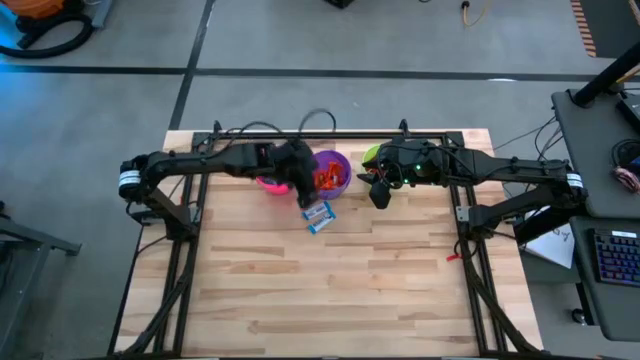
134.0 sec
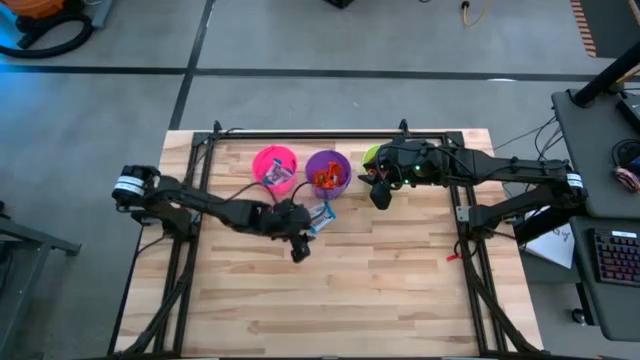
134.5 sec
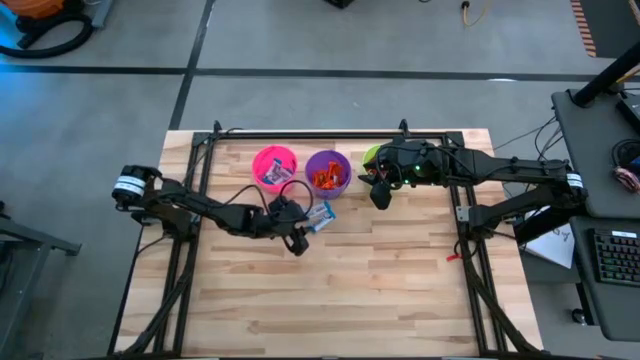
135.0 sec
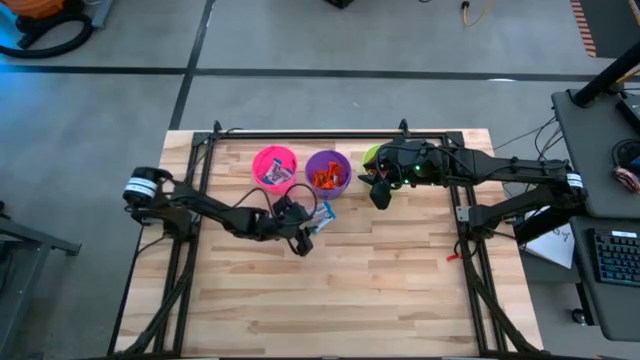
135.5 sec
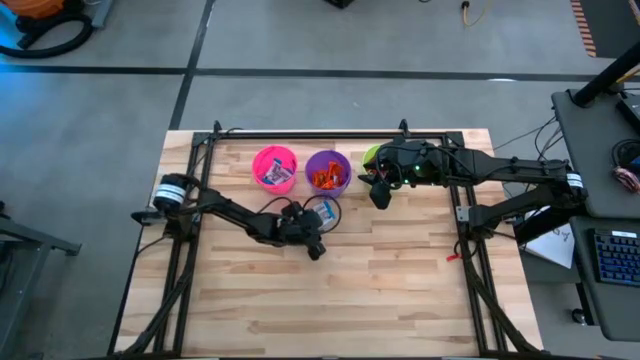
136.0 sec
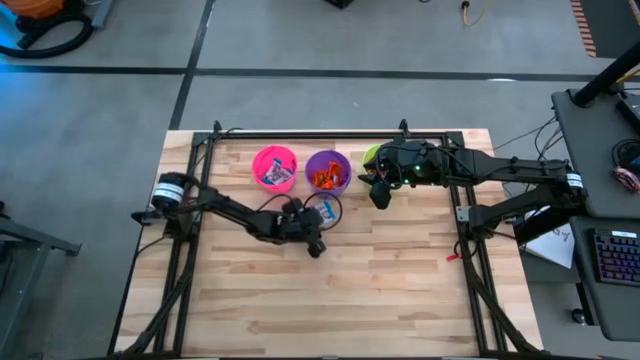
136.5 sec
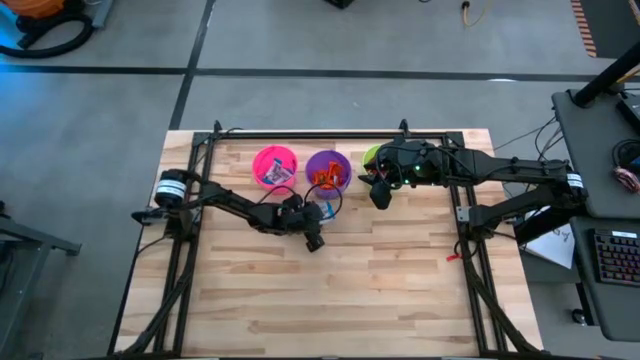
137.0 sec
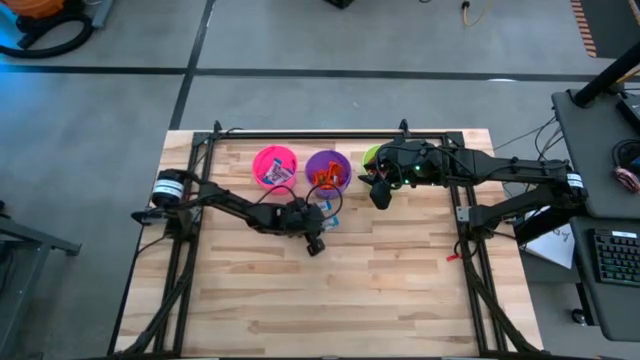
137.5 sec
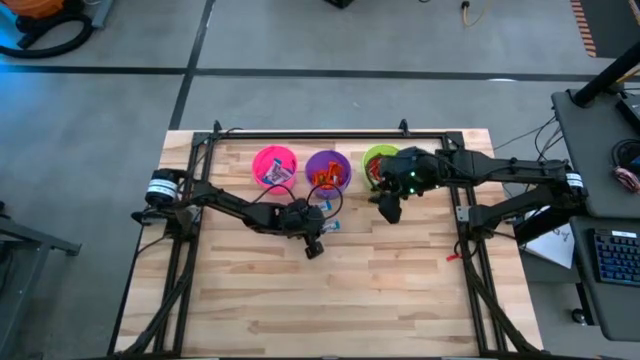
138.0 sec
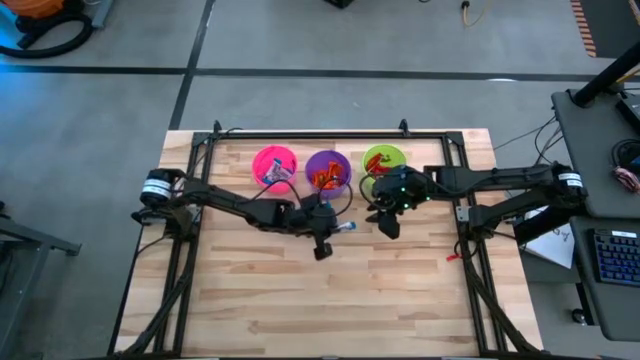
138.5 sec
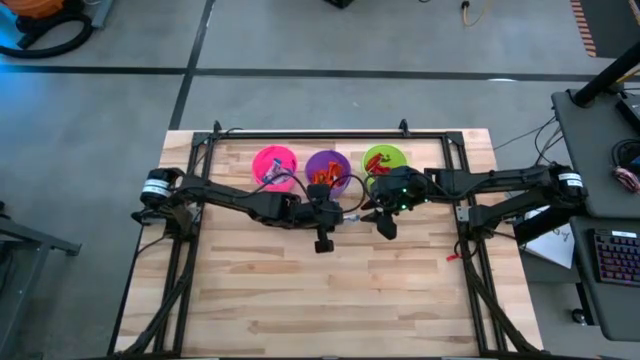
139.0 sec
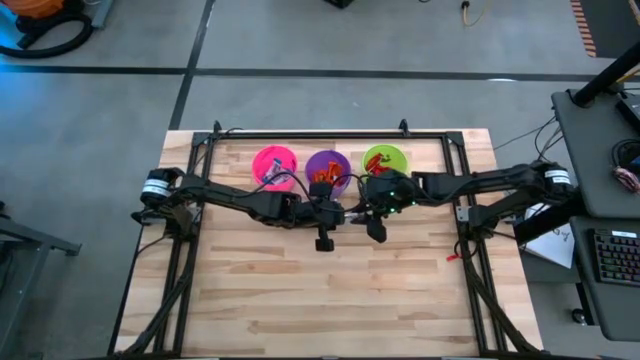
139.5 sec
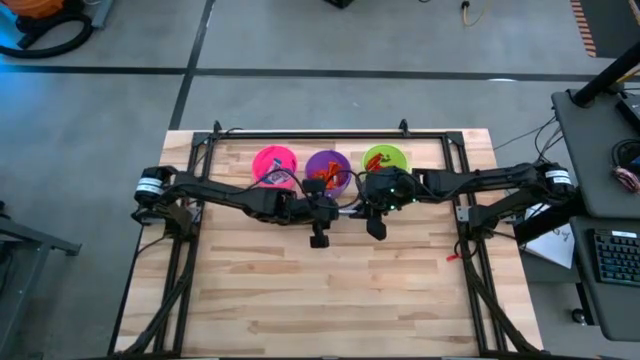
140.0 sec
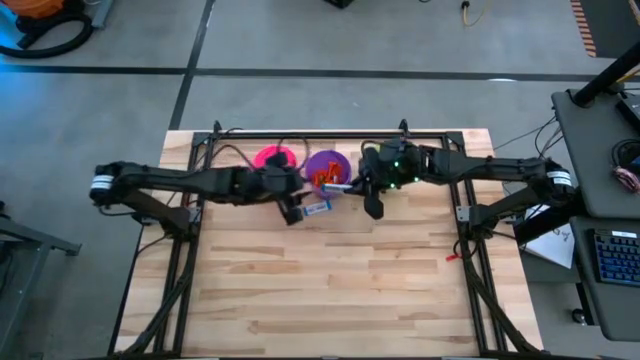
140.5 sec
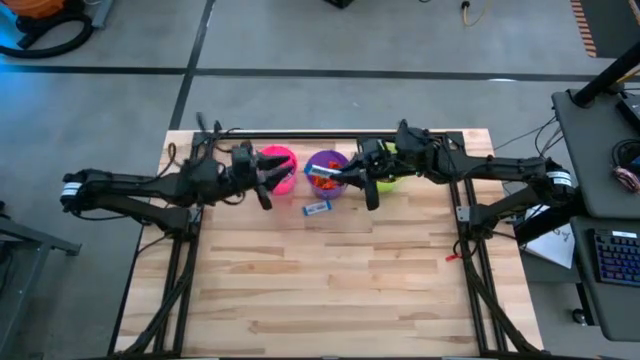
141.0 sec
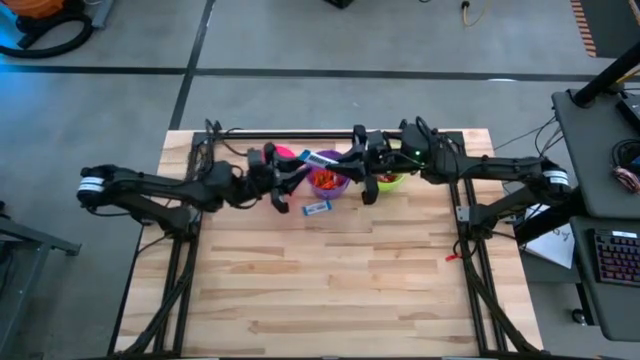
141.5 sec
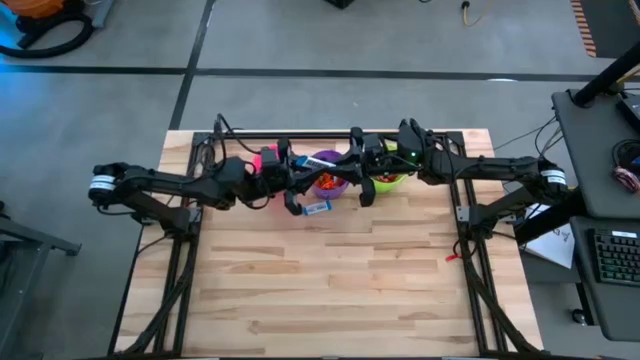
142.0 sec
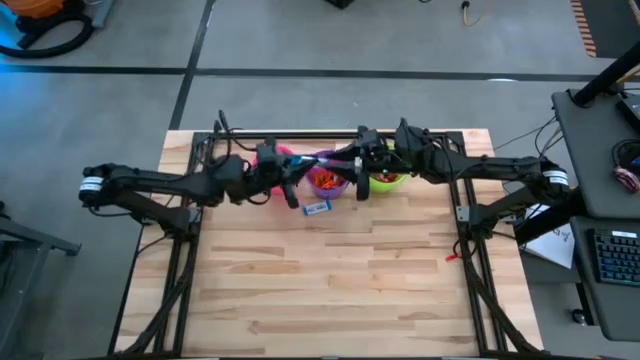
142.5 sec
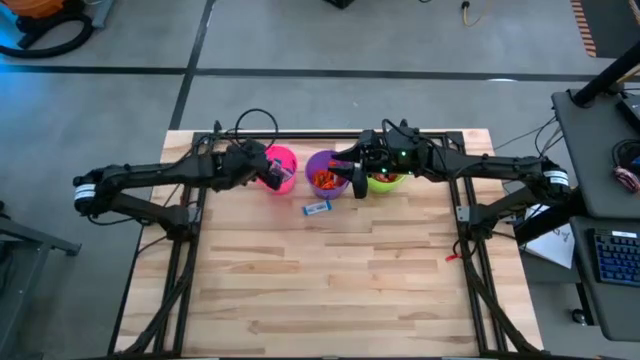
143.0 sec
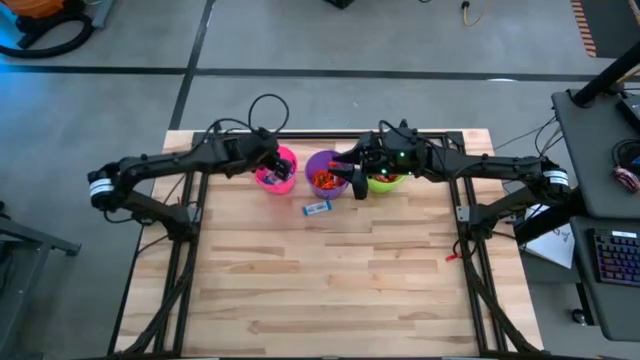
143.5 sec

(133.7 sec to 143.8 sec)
Task: Organize candy in baskets
Put the white chocolate into the pink bucket

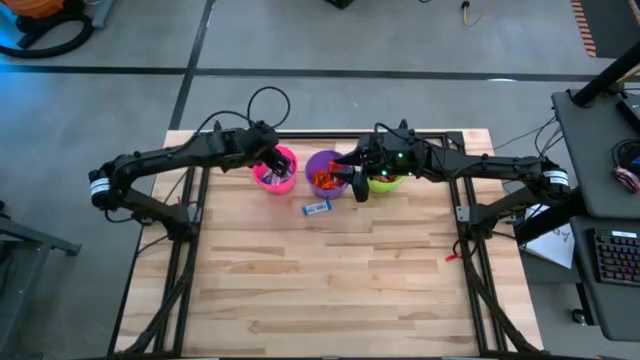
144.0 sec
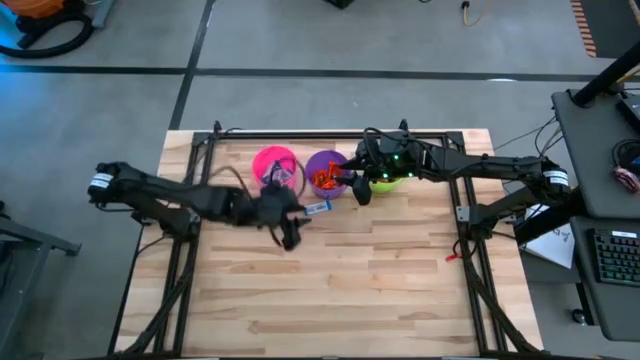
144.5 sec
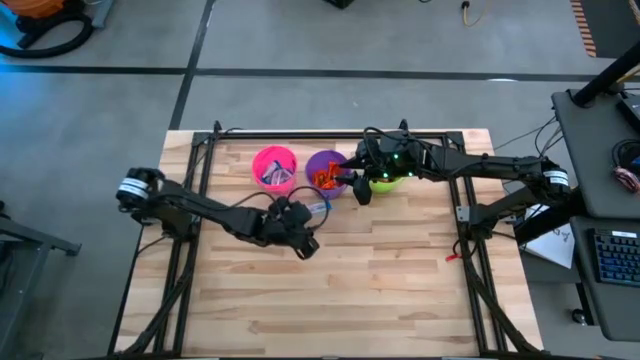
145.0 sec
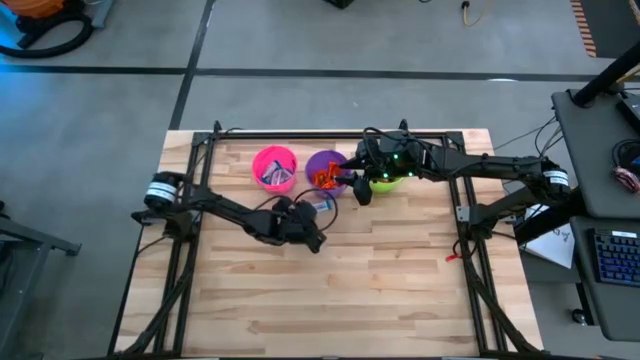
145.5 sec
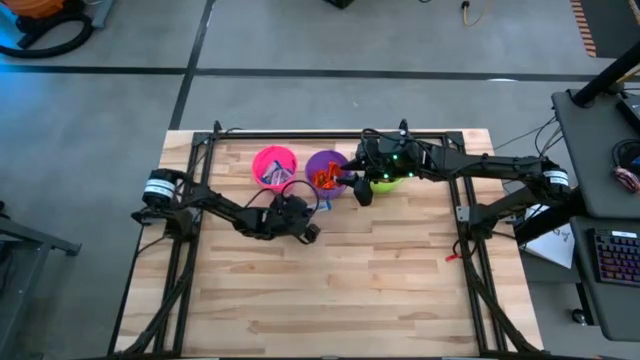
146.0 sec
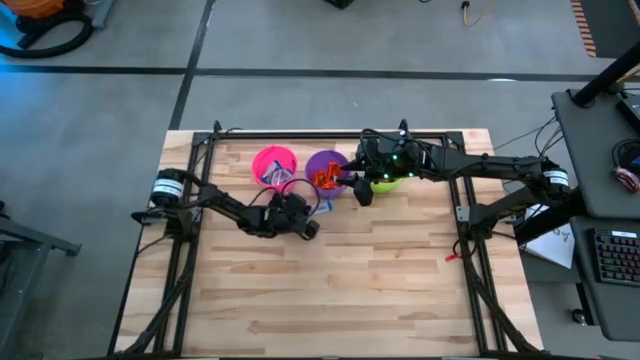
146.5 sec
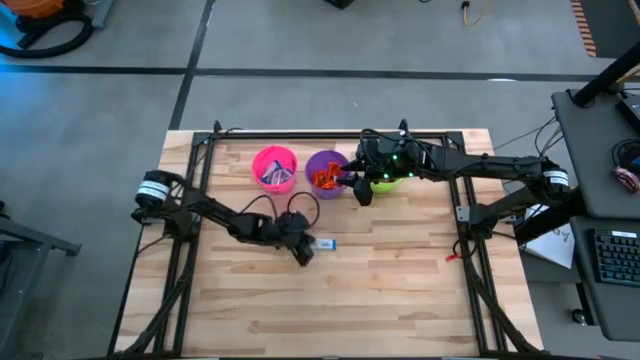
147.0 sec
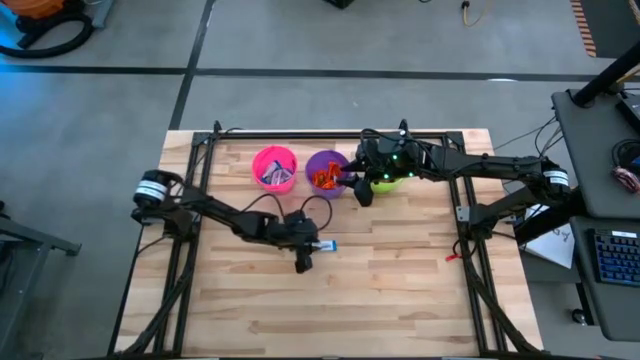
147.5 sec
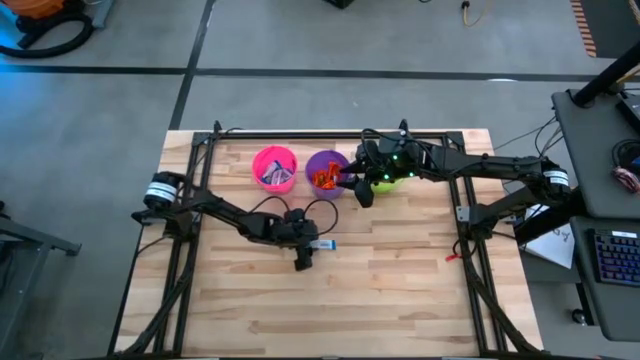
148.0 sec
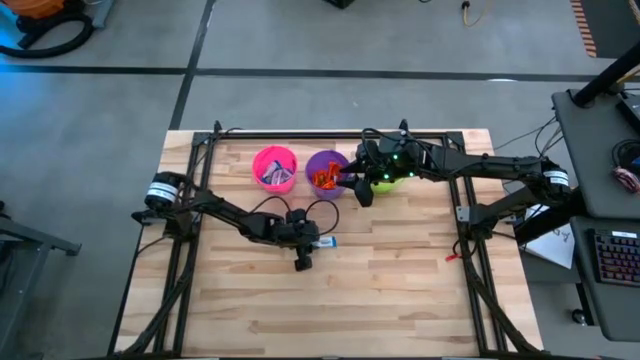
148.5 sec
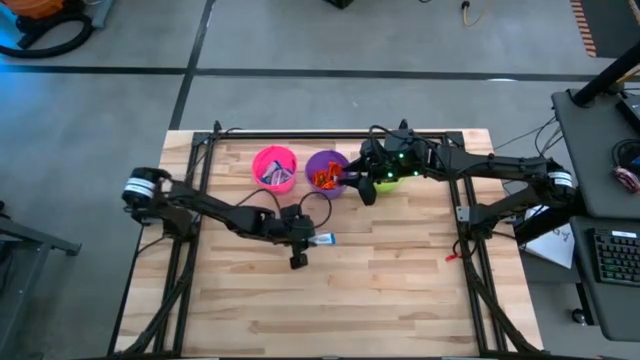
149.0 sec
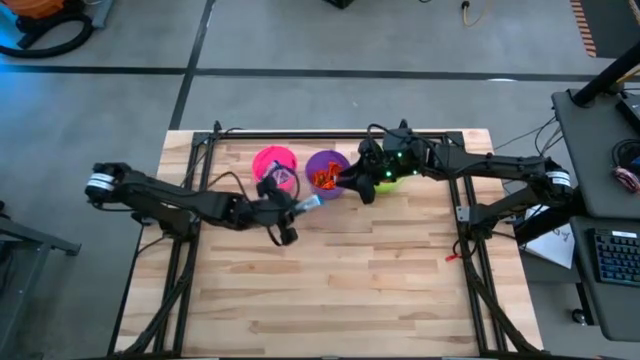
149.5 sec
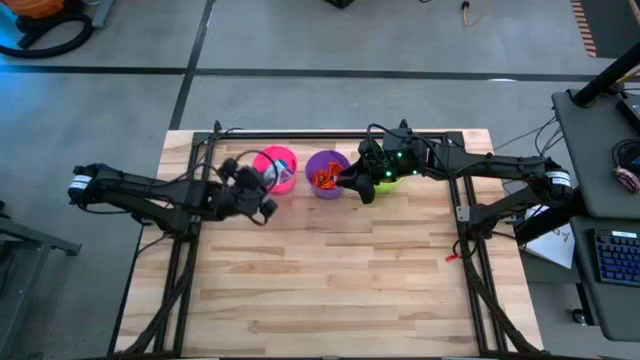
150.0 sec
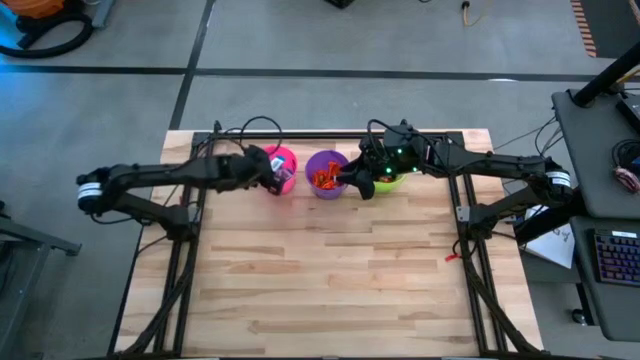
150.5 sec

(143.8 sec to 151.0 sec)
Put the white chocolate into the pink bucket

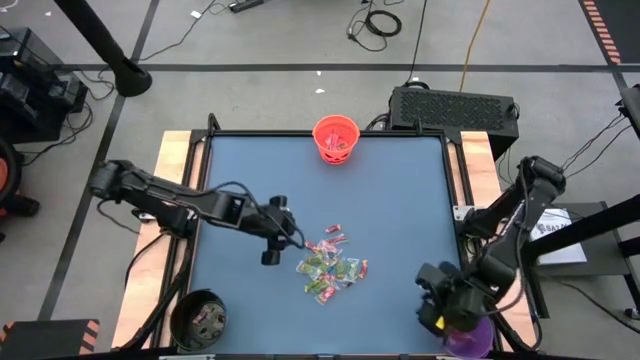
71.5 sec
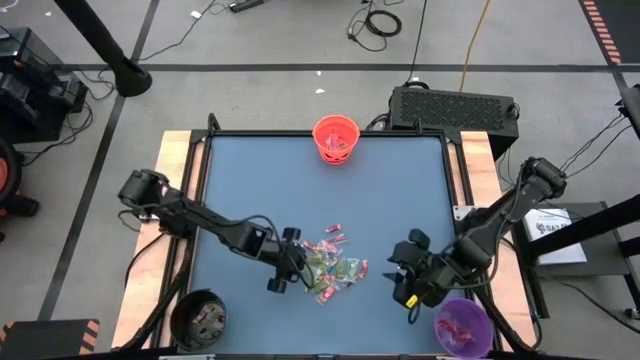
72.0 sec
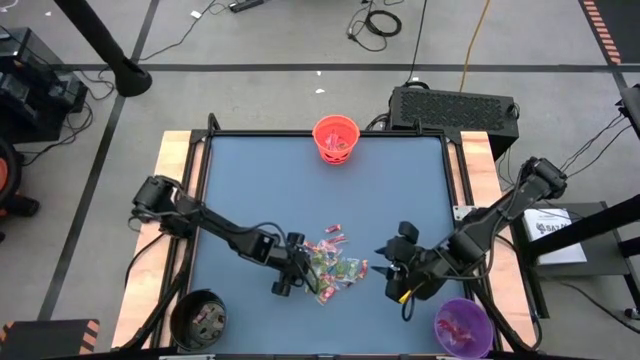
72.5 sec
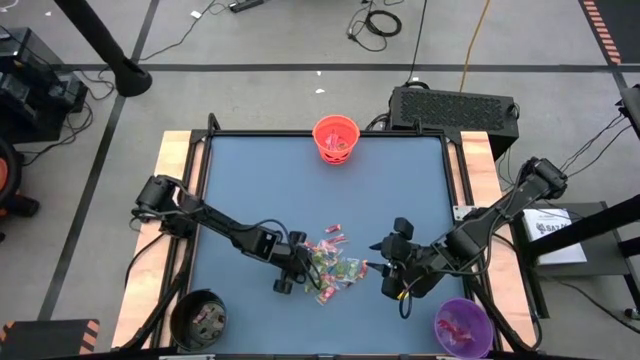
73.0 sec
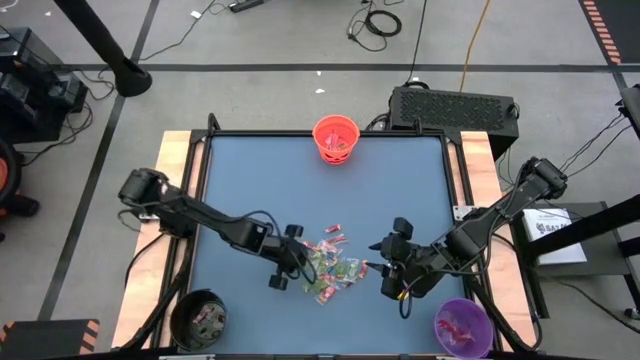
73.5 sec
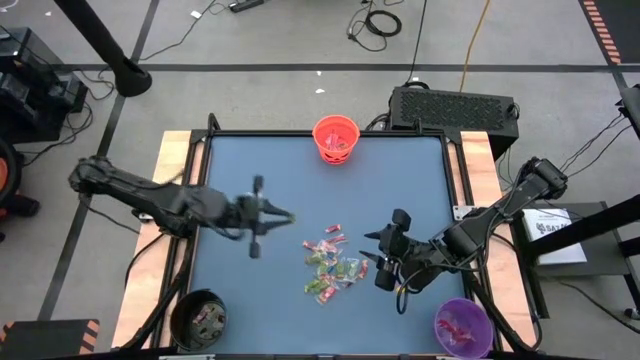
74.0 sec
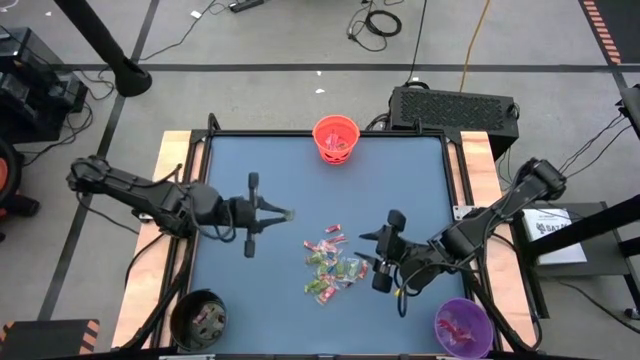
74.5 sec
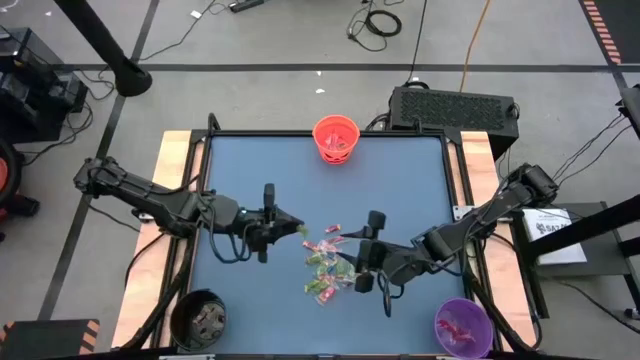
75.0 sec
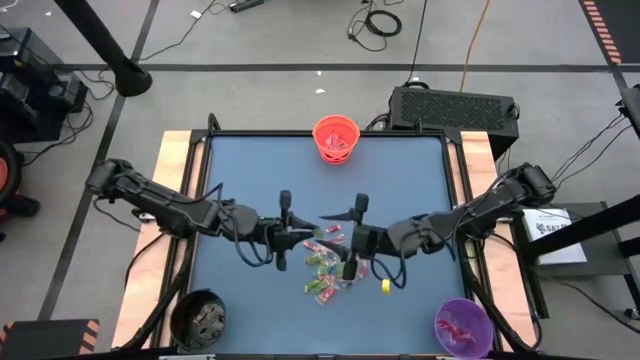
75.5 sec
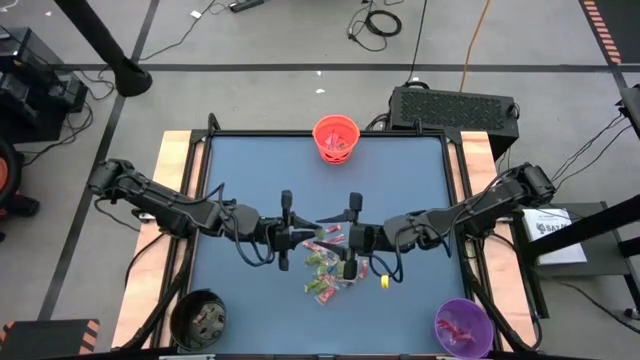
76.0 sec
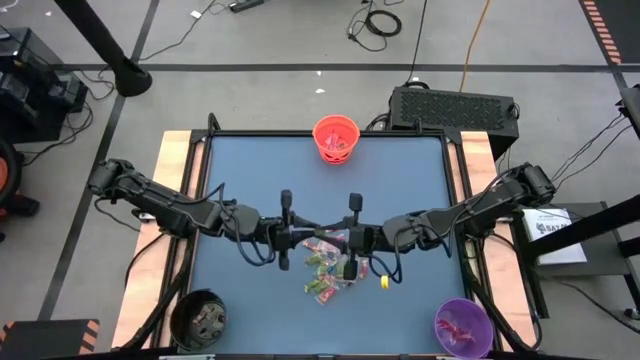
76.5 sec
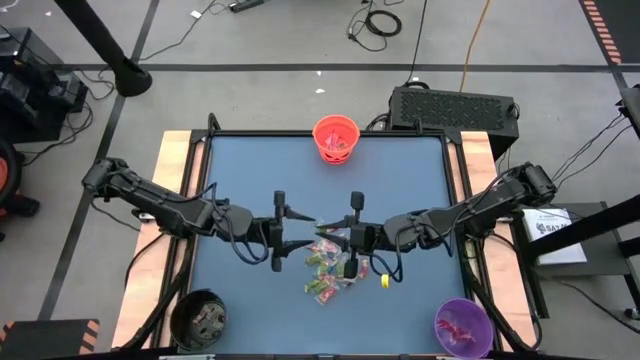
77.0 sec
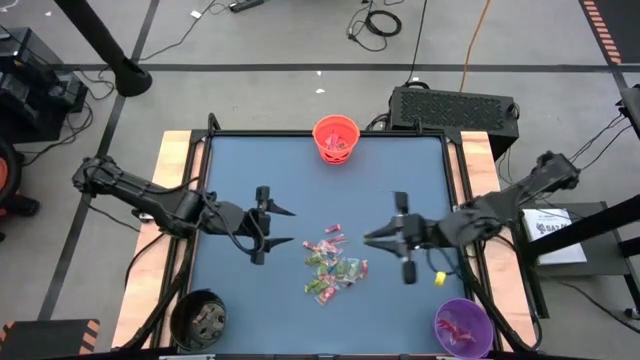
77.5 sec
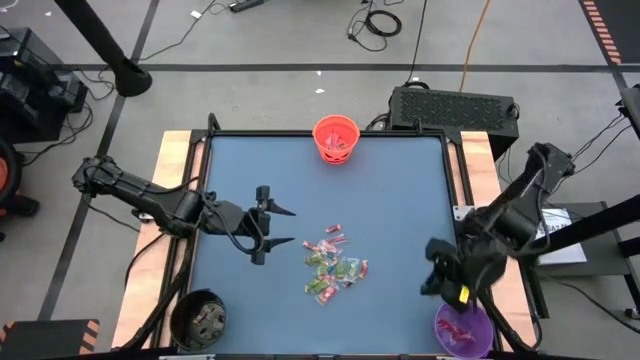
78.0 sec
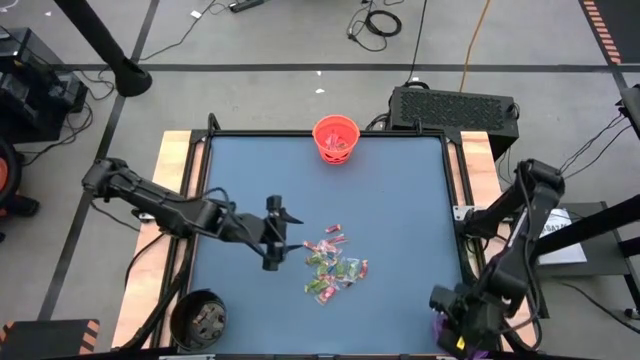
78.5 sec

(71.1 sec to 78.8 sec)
Task: Sort candy by brand, put in halloween buckets
Put the small green gummy into the purple bucket
